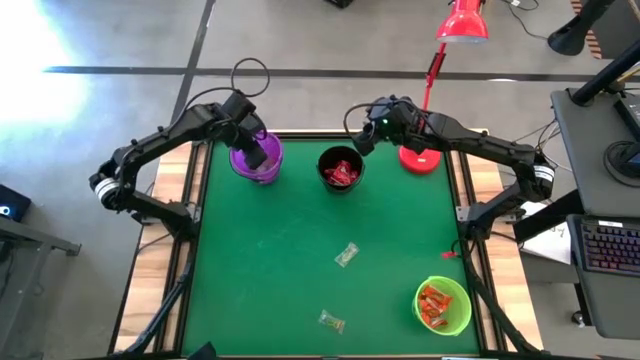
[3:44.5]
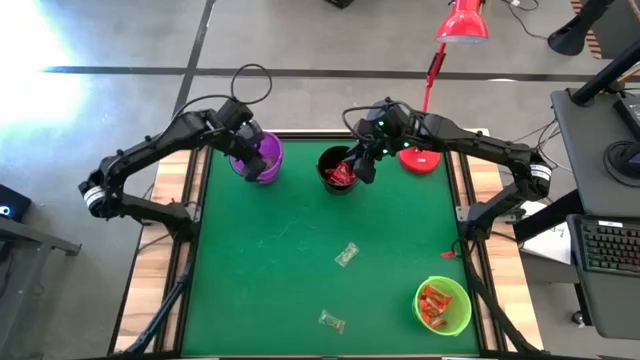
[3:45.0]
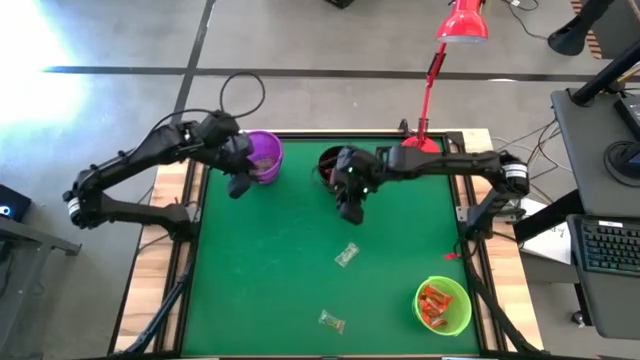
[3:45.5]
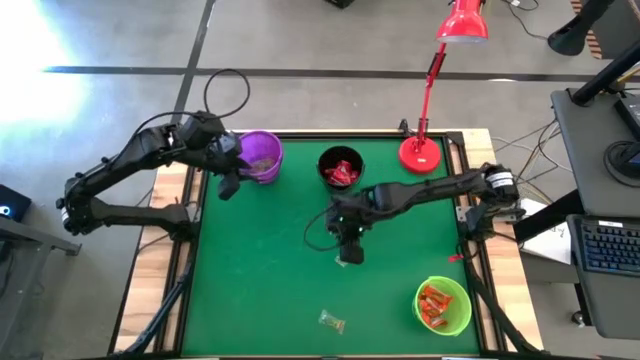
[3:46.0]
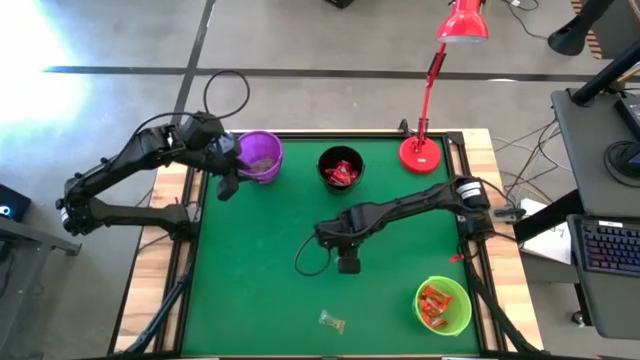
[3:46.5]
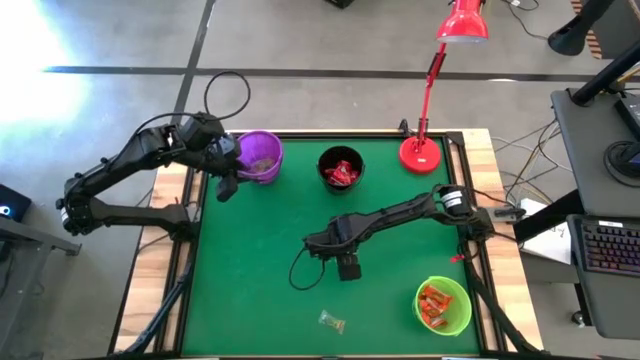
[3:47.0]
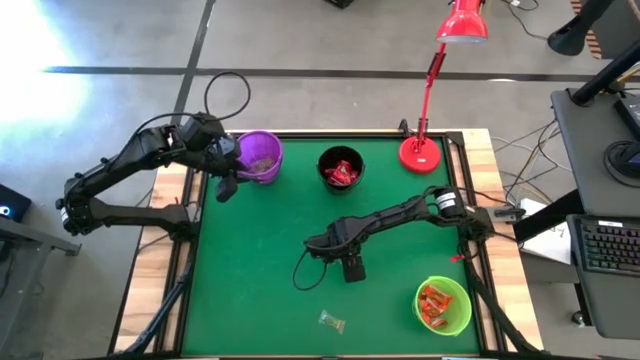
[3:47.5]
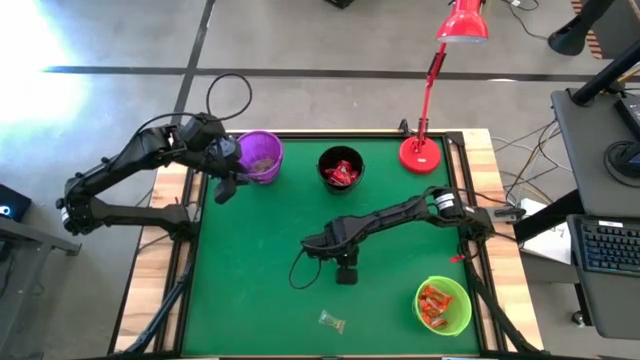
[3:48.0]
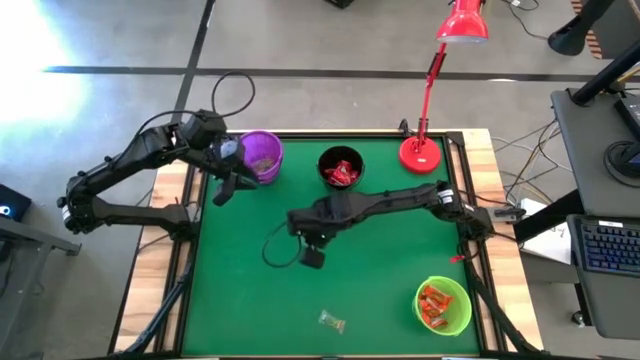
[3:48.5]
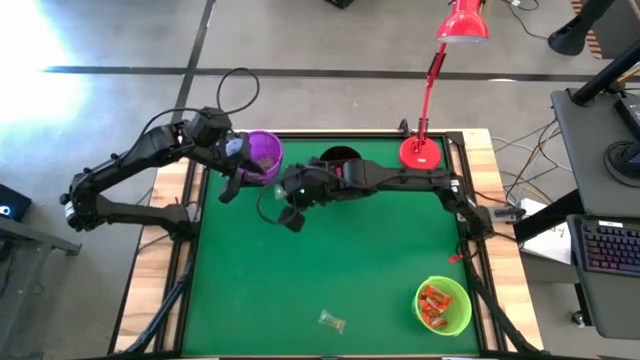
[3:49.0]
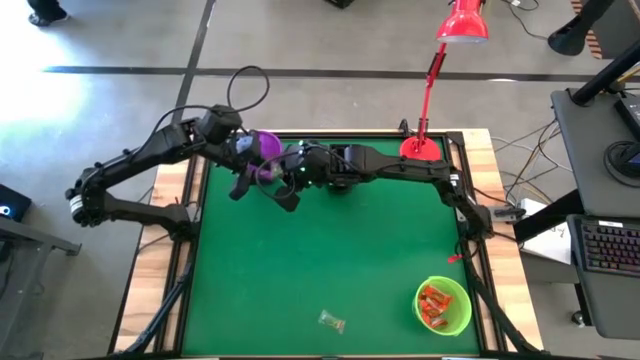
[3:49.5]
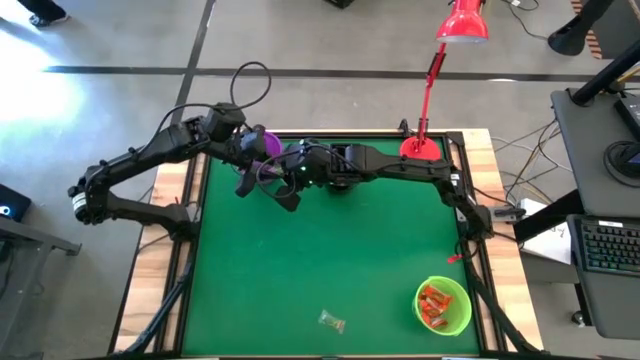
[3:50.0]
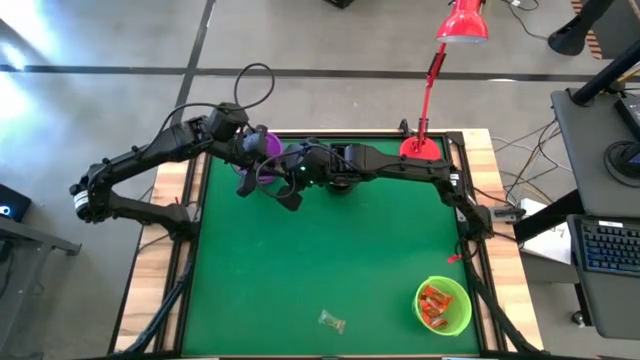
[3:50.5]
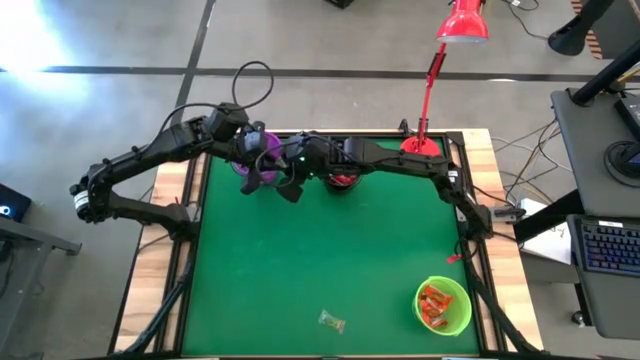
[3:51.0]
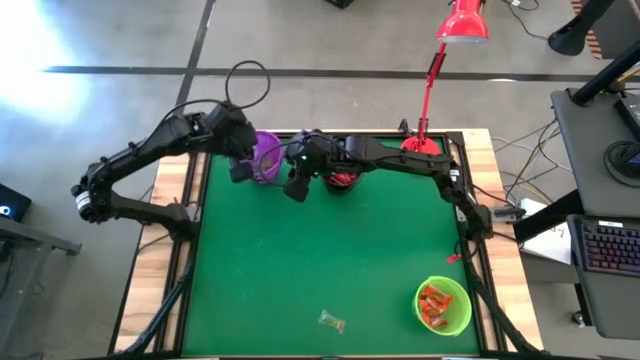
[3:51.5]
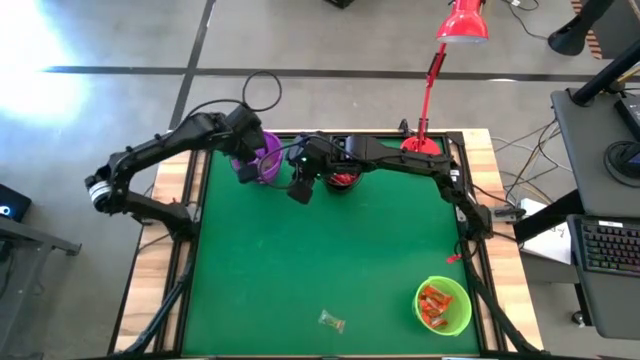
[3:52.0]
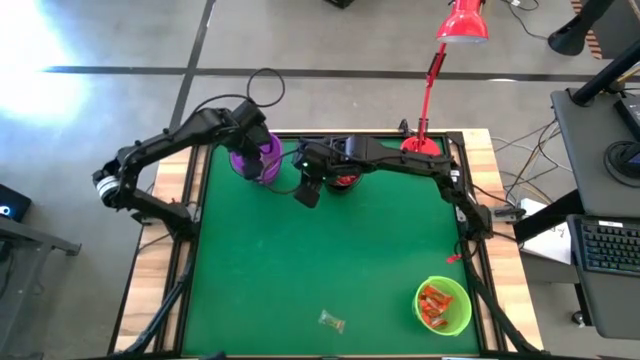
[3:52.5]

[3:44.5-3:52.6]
Task: Sort candy
Put the green candy pack into the purple bucket

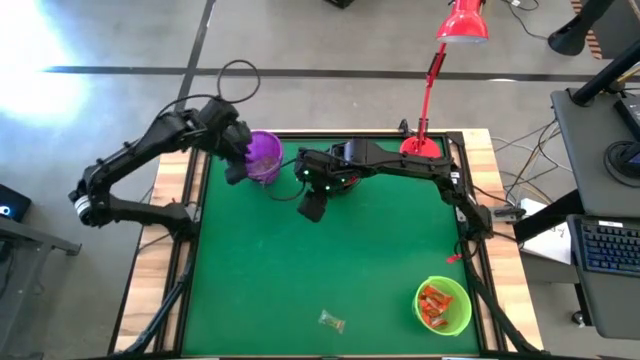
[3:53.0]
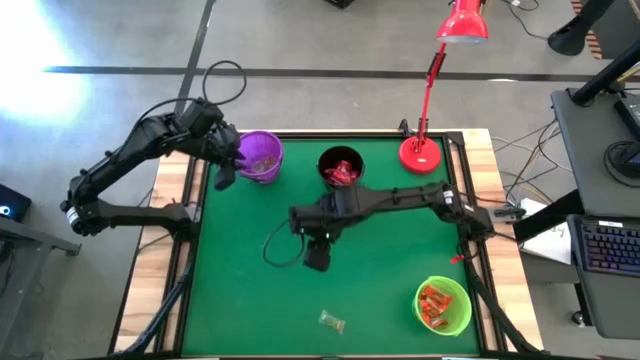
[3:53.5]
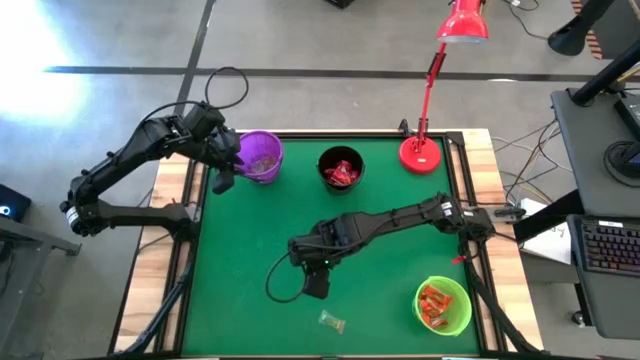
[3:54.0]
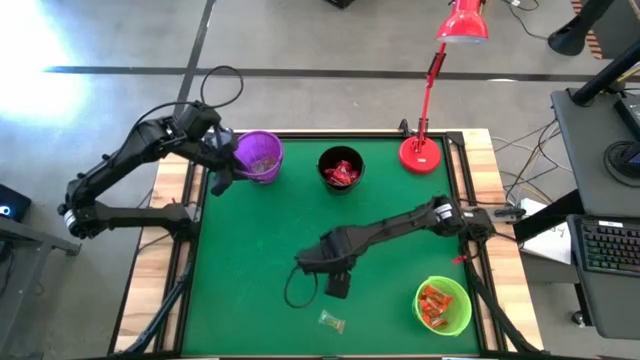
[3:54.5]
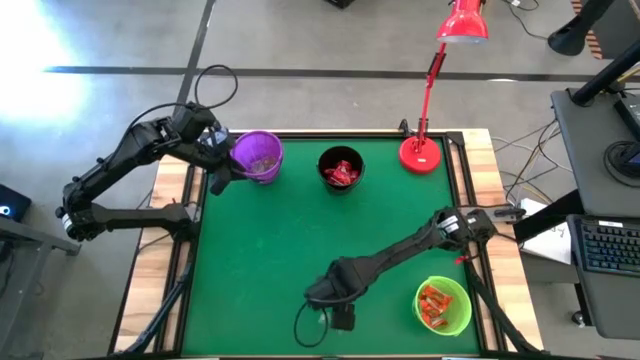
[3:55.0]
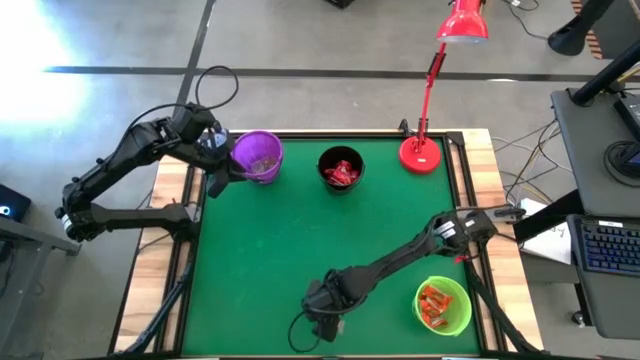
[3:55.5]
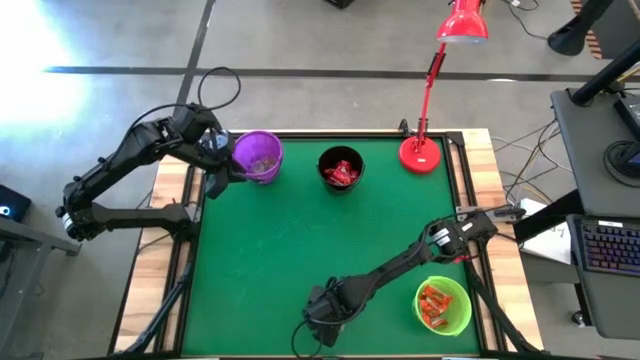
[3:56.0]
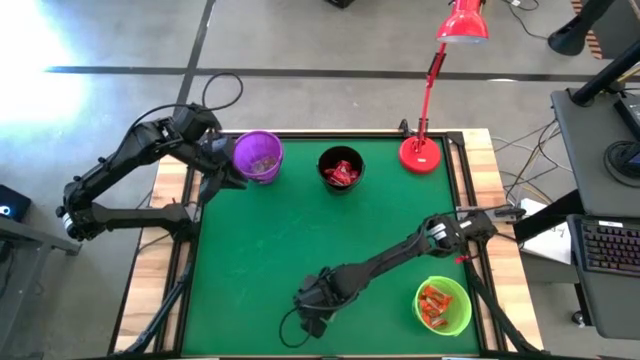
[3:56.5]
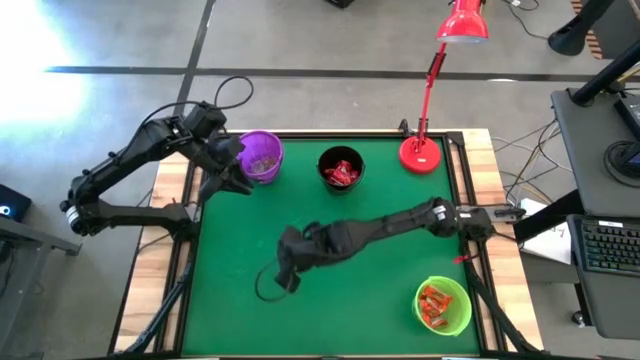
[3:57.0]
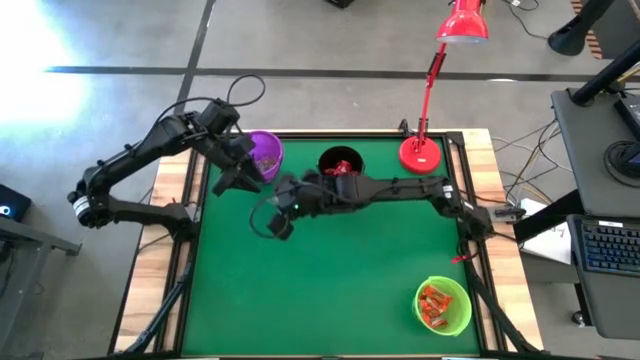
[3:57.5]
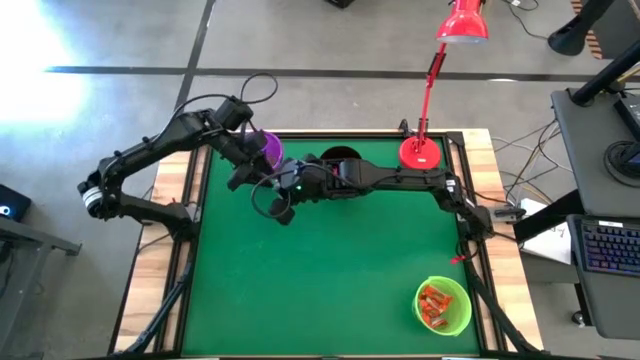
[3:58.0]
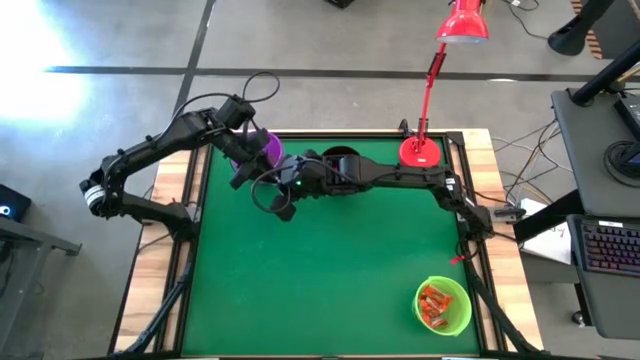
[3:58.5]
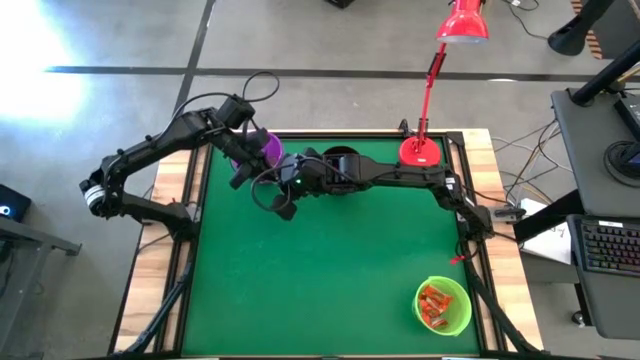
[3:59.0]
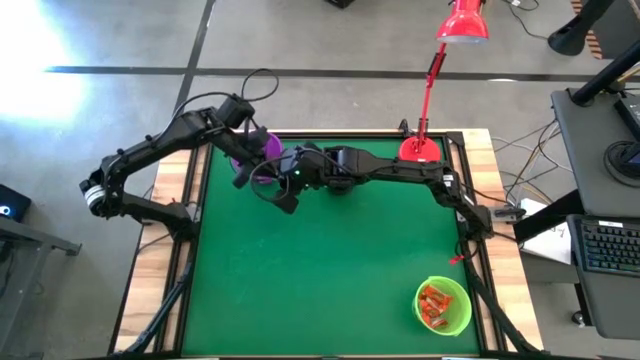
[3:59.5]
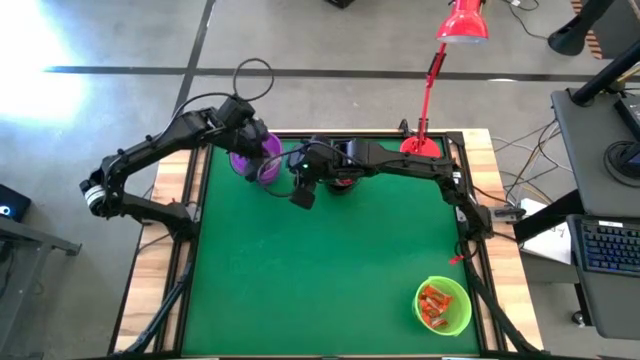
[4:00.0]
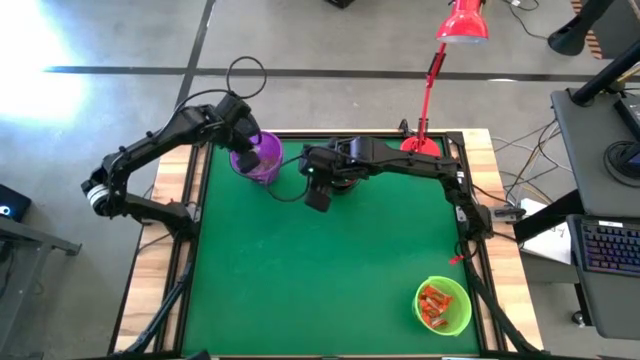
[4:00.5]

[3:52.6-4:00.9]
Put the green gummy into the violet bucket

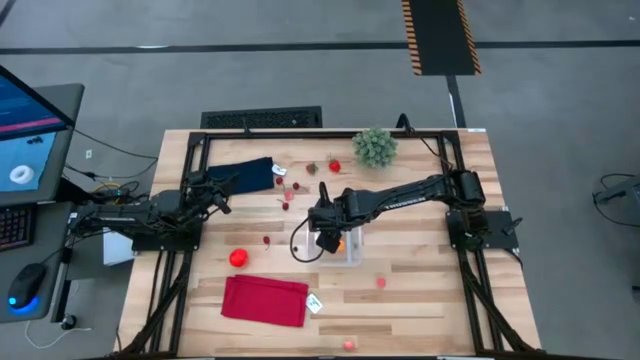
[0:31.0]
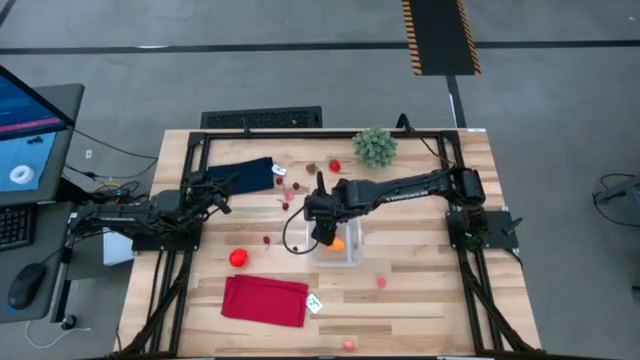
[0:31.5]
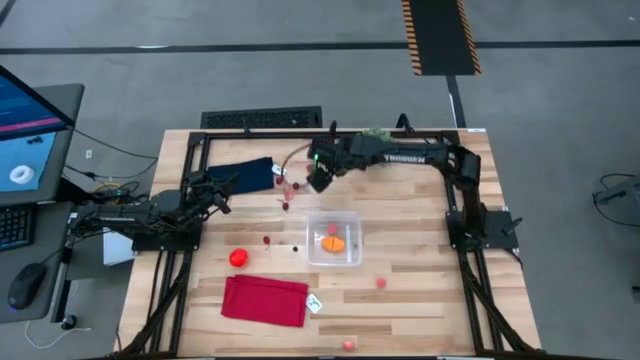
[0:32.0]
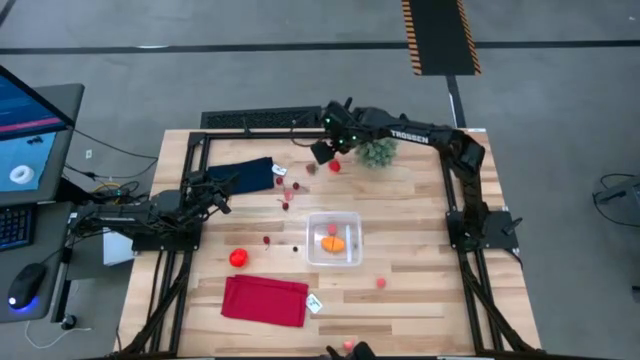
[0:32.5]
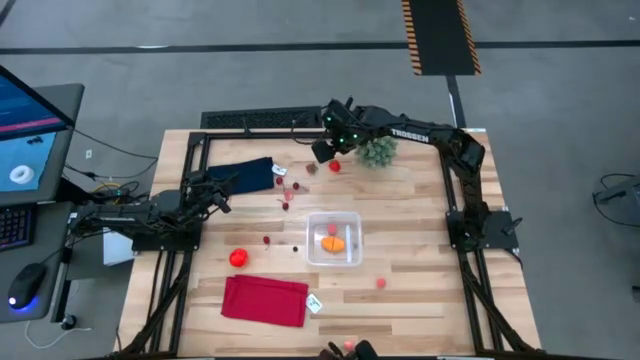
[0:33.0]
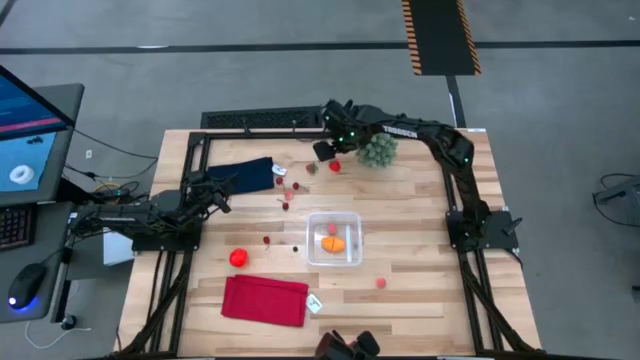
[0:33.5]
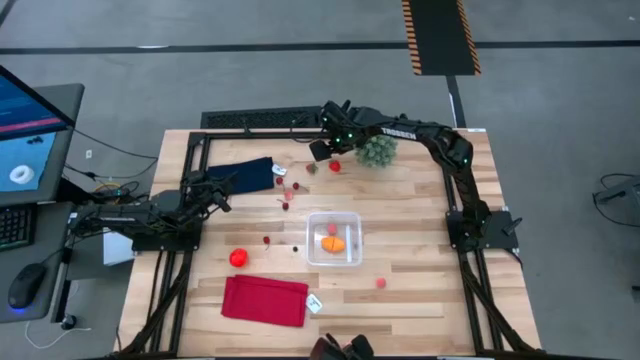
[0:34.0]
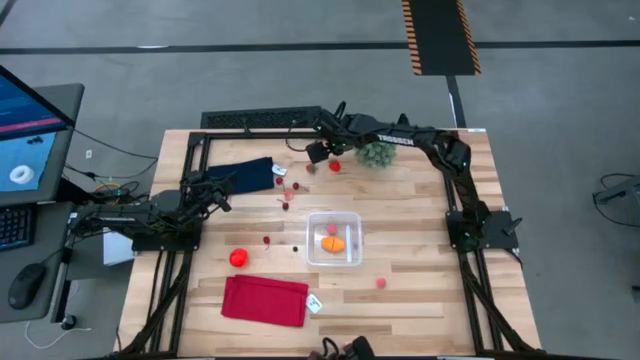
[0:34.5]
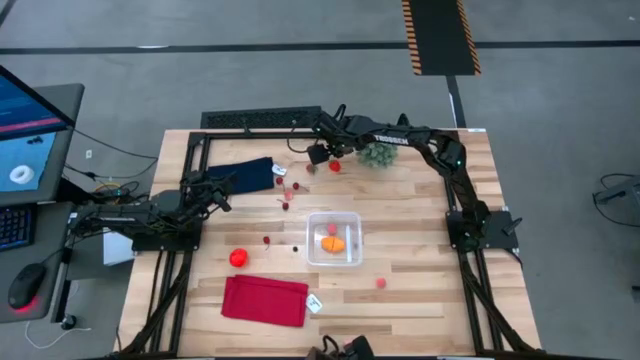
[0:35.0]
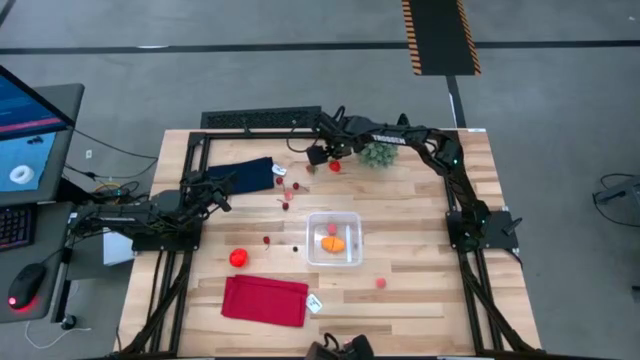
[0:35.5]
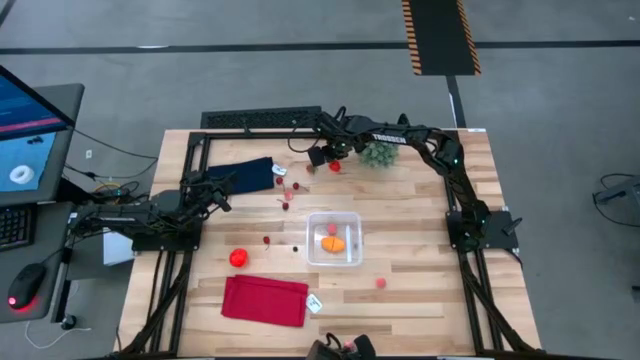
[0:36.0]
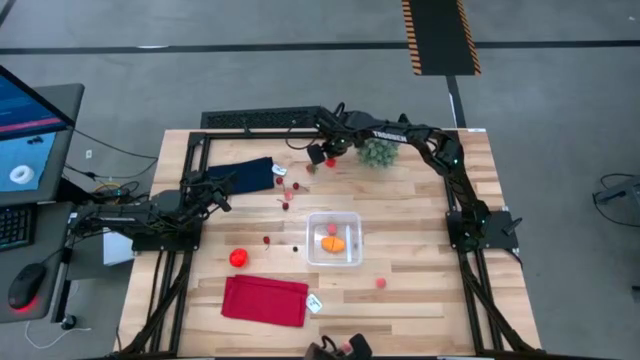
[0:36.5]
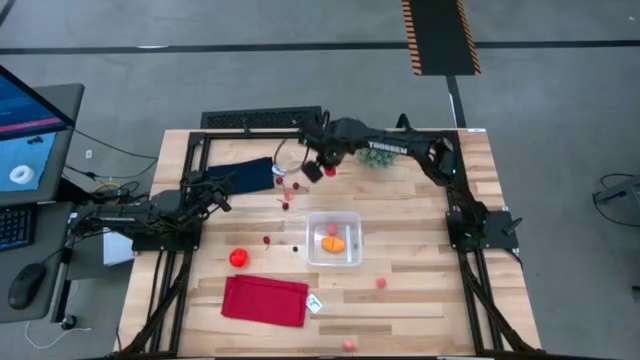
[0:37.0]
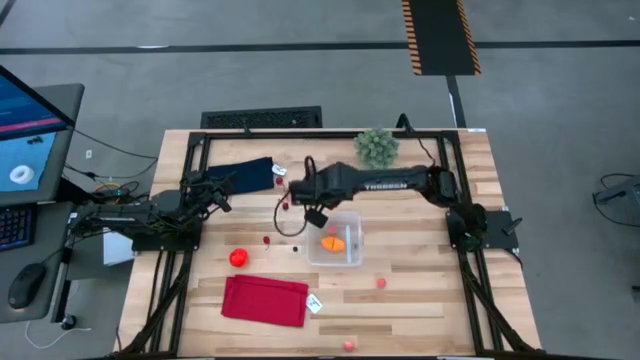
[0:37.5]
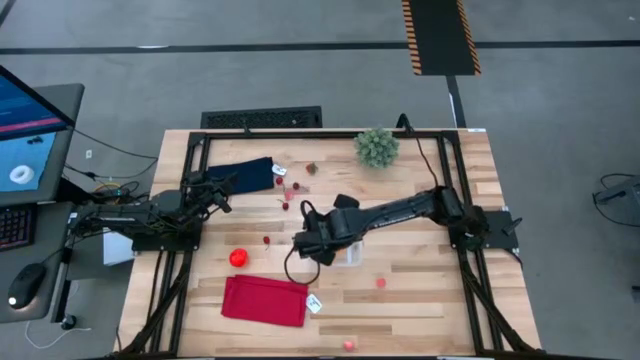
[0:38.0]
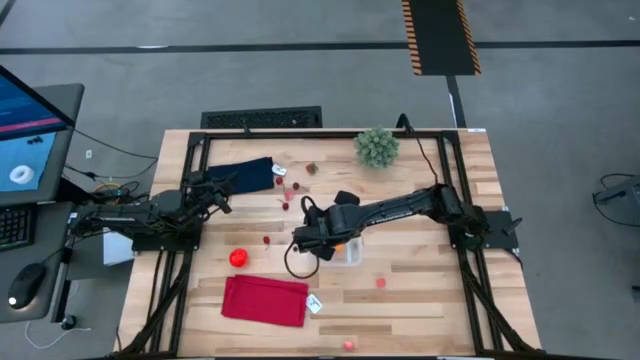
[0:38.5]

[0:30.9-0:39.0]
Task: Pick and placing Produce into tupperware
Put the red strawberry into the transparent bin
